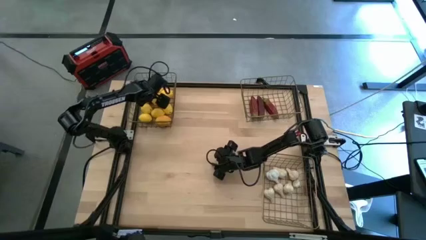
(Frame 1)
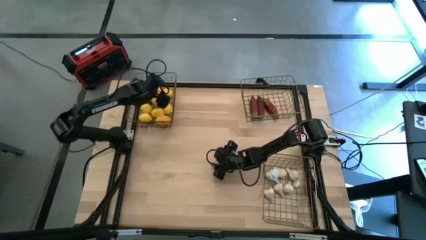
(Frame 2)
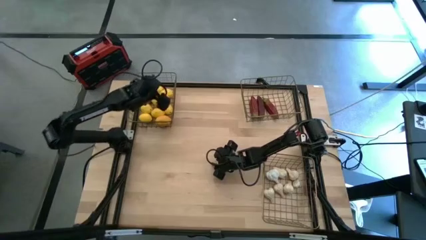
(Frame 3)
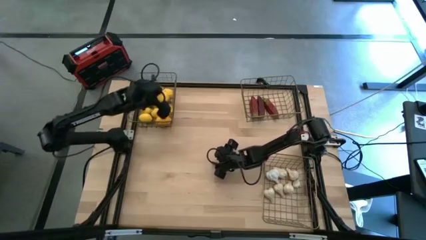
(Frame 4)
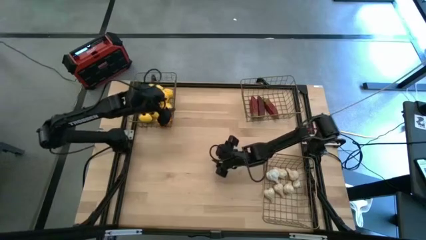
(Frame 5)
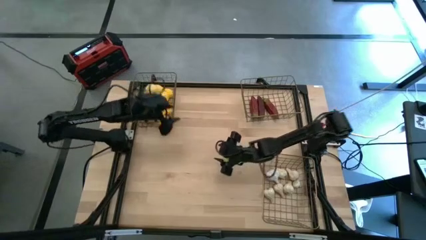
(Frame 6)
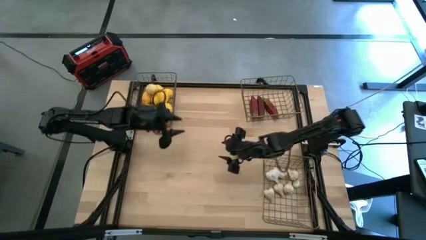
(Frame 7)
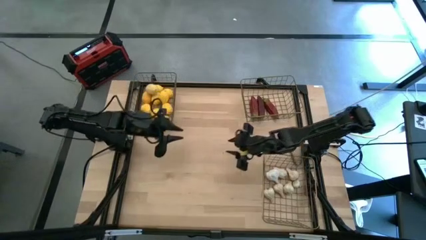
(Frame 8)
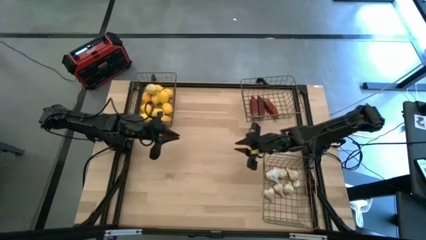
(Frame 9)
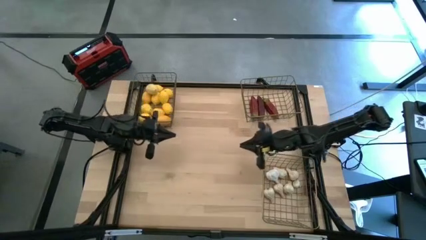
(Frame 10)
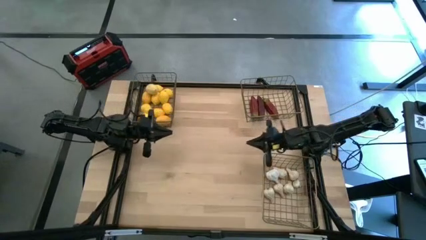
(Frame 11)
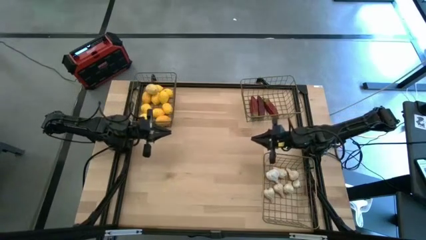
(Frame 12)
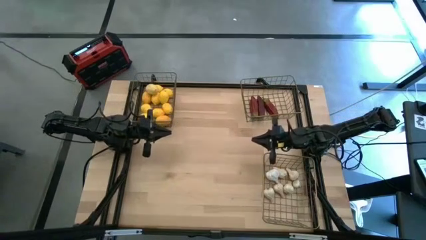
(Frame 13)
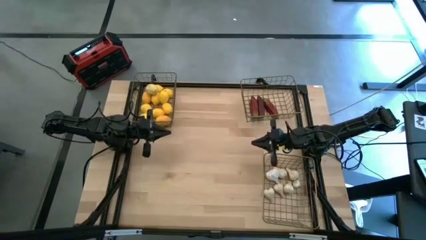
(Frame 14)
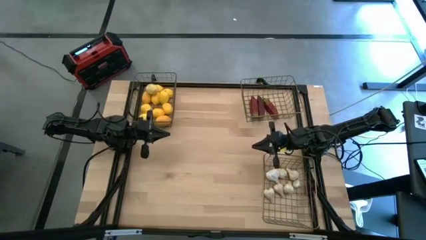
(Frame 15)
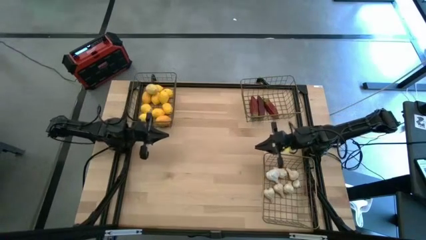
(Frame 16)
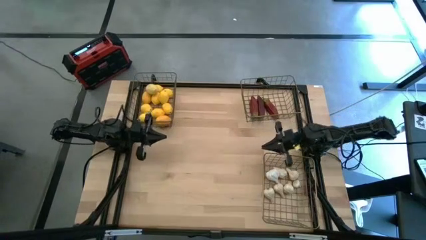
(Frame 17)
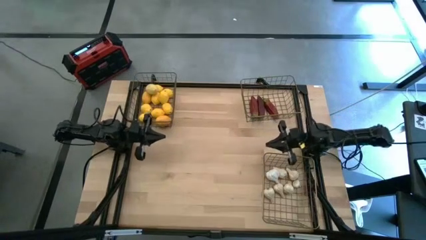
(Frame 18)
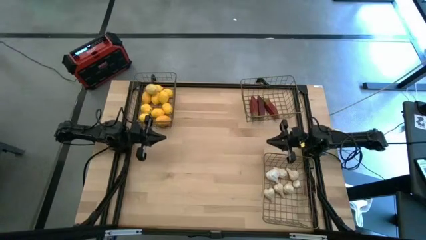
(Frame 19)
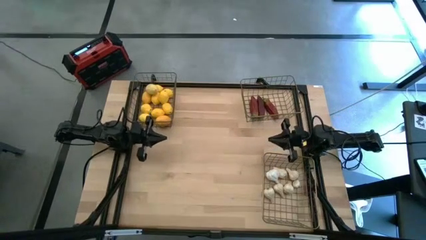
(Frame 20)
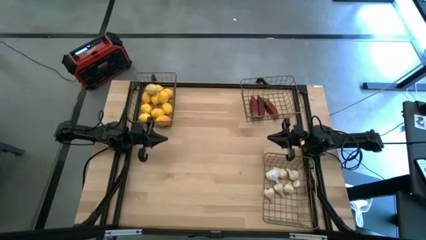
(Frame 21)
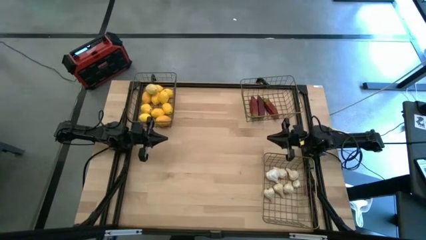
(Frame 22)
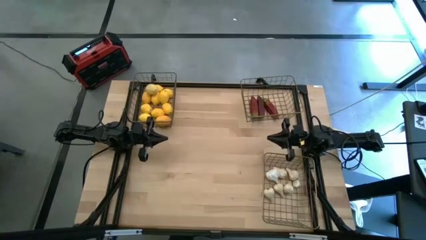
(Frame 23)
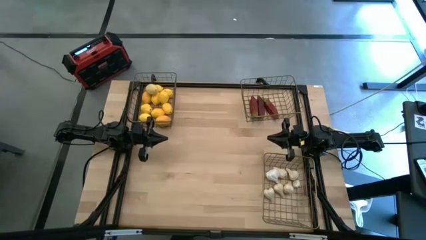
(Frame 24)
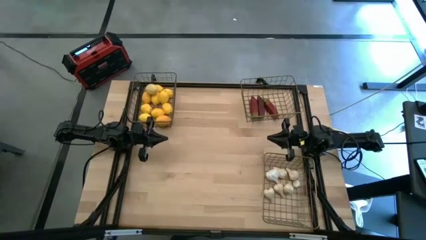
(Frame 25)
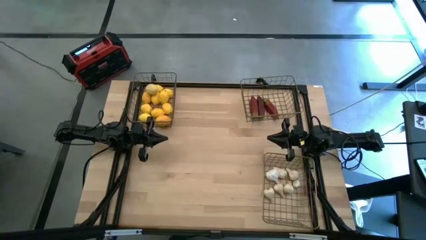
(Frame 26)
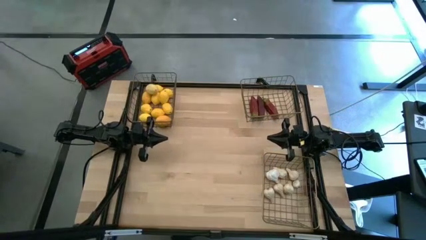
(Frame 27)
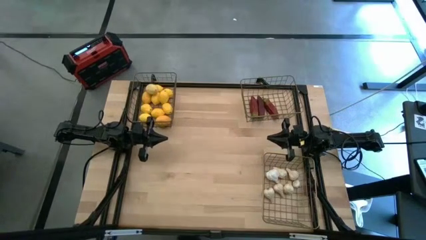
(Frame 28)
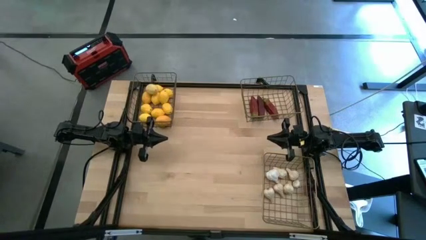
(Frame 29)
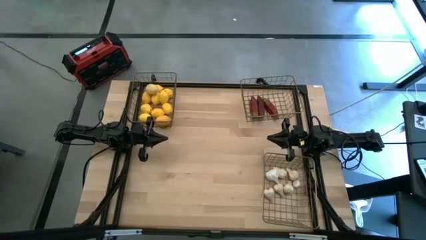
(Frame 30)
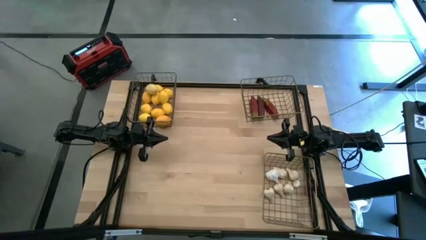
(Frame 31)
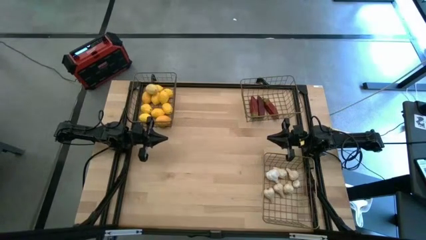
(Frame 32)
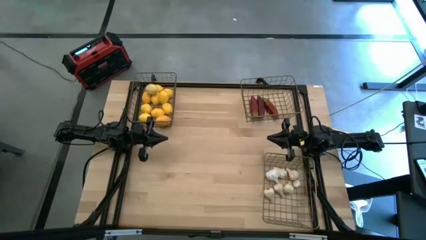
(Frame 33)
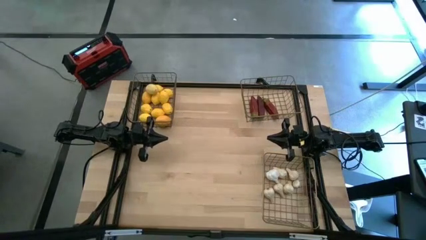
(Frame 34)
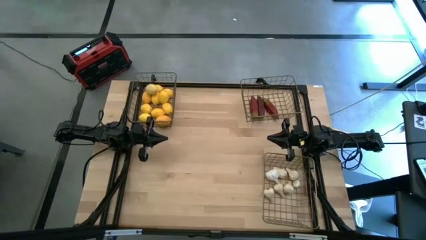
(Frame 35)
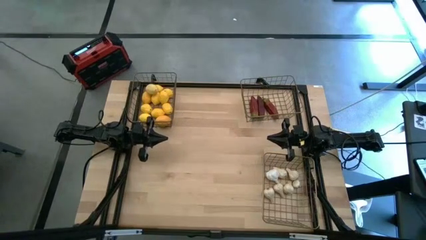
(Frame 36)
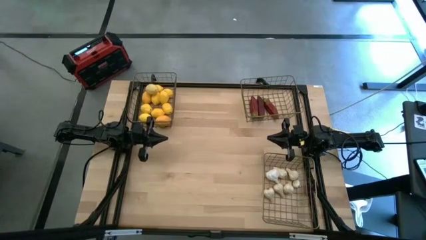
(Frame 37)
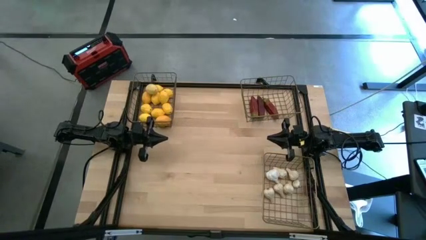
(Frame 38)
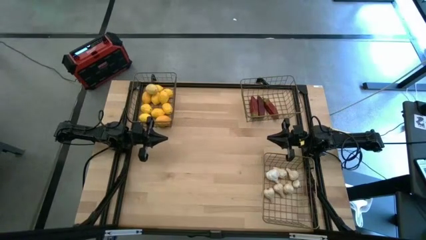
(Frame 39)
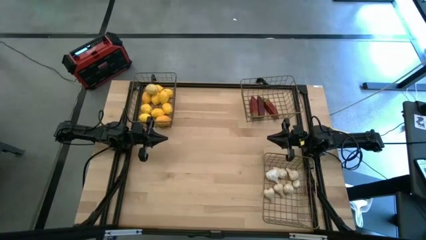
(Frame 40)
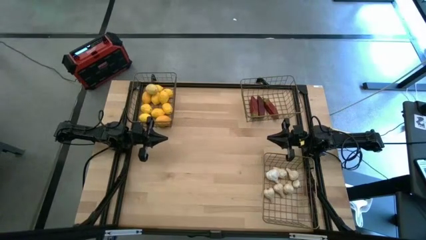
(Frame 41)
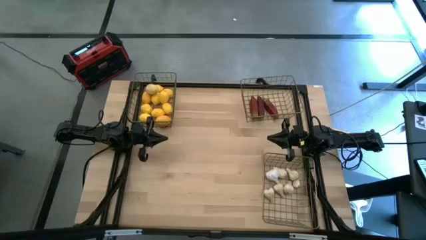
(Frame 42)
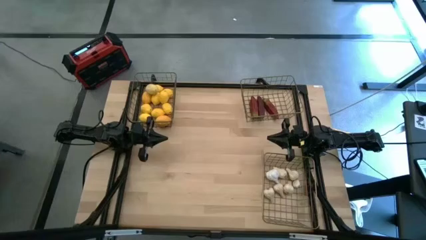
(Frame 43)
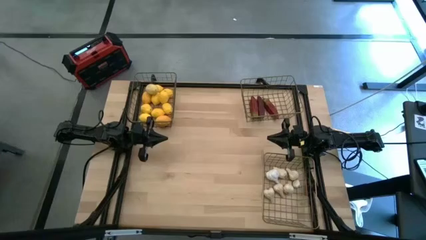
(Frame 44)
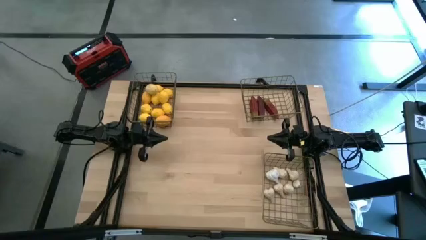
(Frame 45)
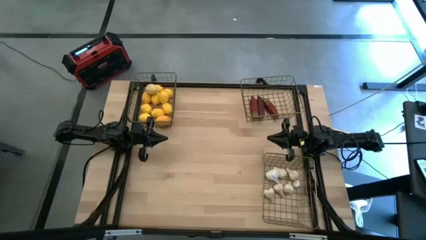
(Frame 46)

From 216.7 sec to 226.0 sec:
Task: Sort produce into baskets
Return to Home Position

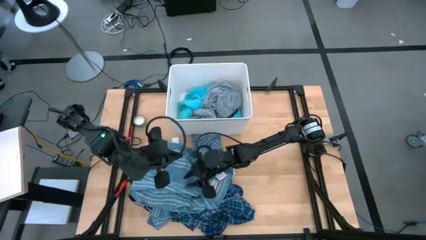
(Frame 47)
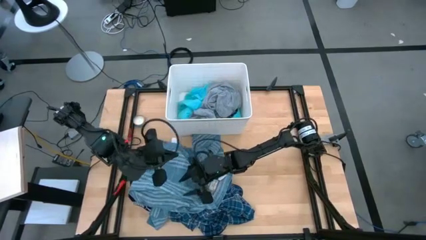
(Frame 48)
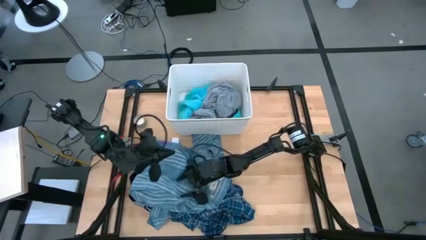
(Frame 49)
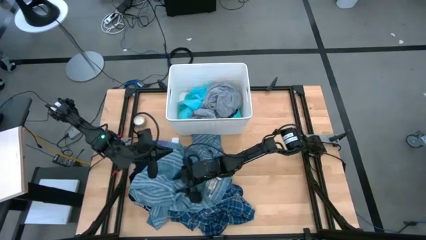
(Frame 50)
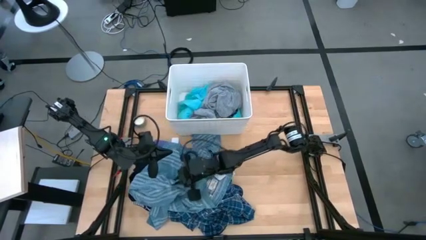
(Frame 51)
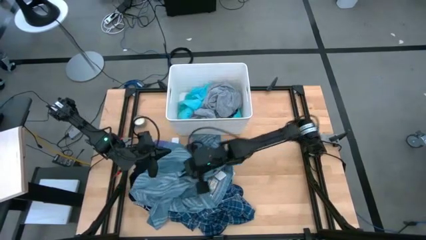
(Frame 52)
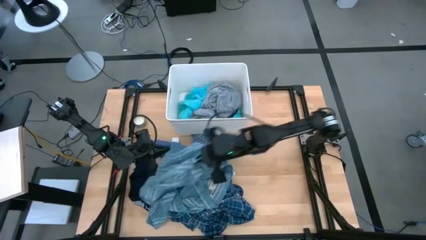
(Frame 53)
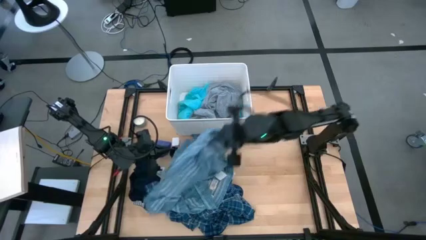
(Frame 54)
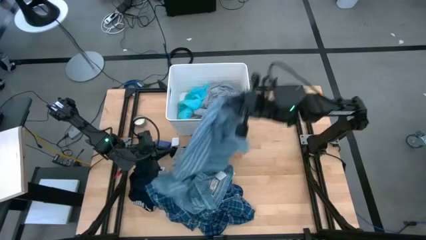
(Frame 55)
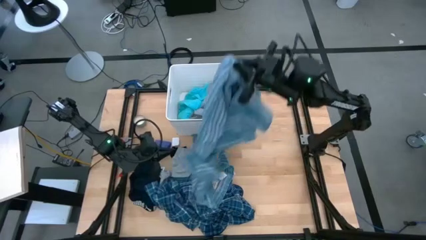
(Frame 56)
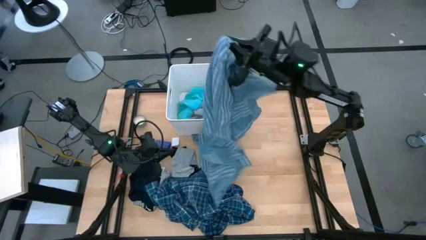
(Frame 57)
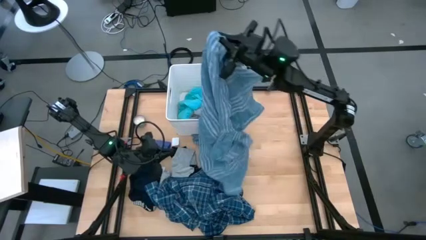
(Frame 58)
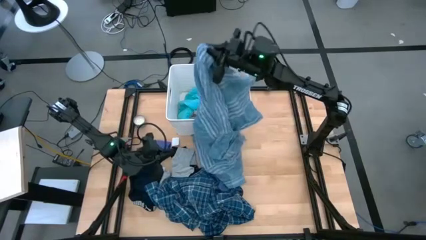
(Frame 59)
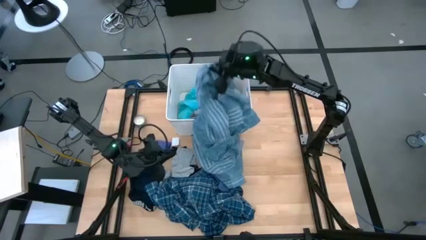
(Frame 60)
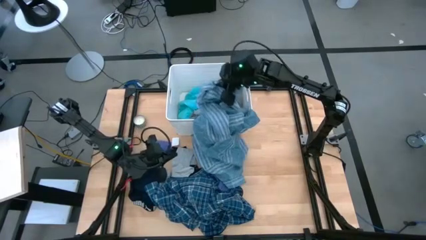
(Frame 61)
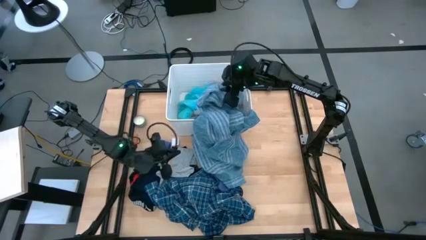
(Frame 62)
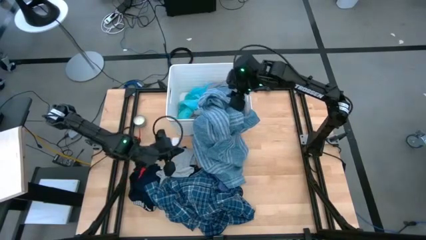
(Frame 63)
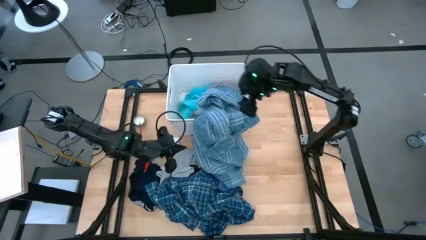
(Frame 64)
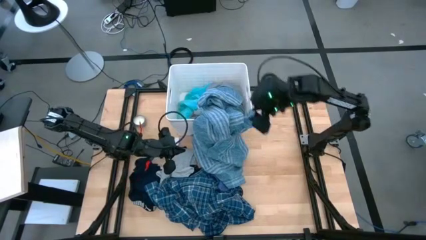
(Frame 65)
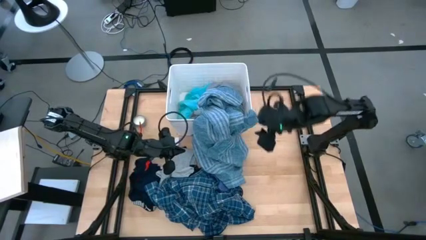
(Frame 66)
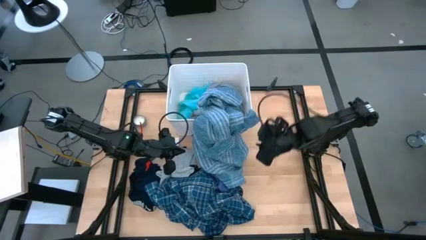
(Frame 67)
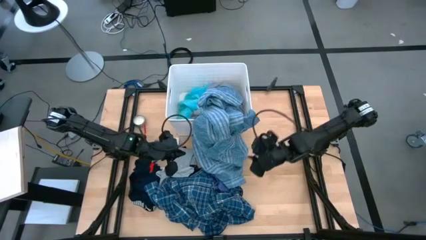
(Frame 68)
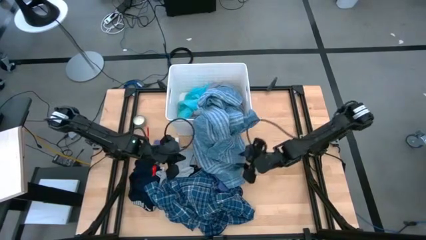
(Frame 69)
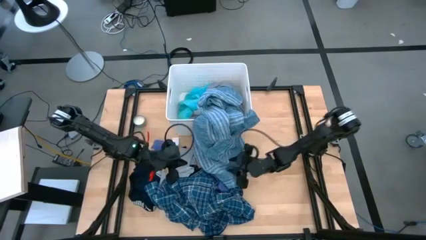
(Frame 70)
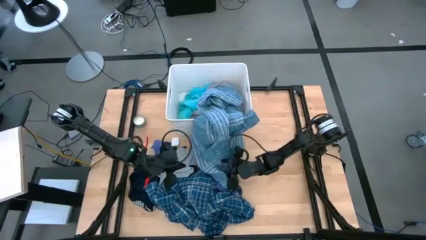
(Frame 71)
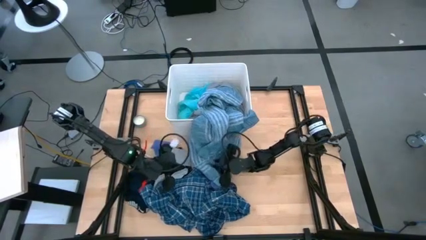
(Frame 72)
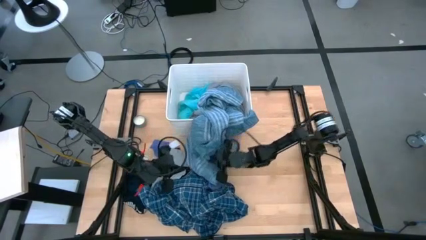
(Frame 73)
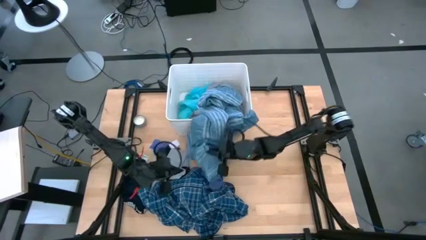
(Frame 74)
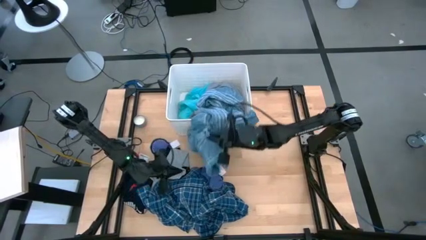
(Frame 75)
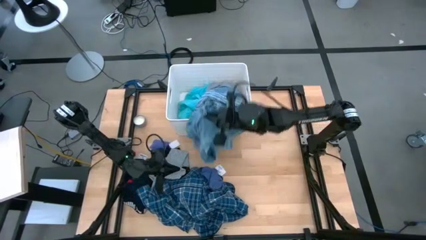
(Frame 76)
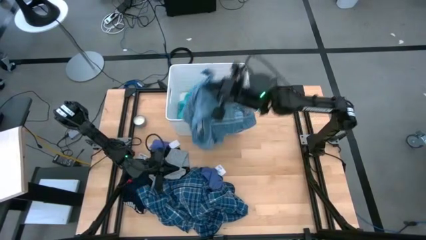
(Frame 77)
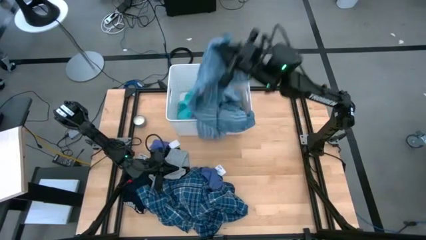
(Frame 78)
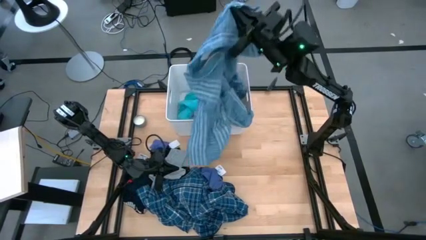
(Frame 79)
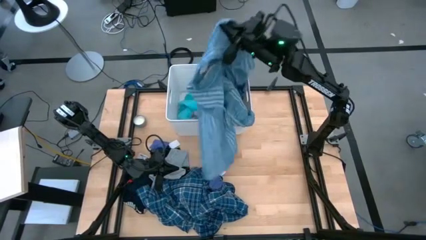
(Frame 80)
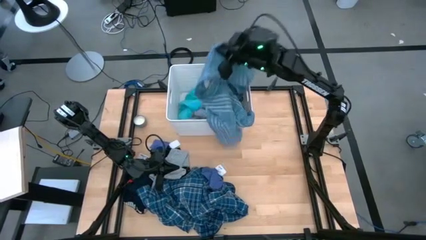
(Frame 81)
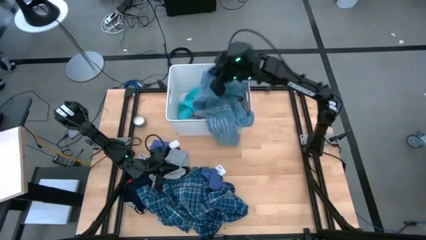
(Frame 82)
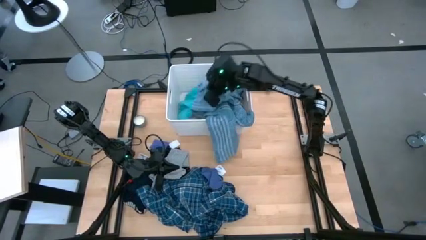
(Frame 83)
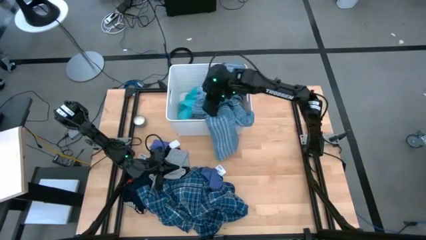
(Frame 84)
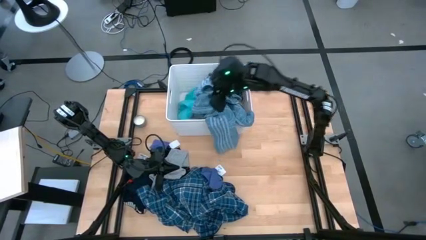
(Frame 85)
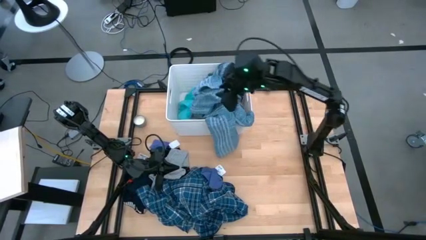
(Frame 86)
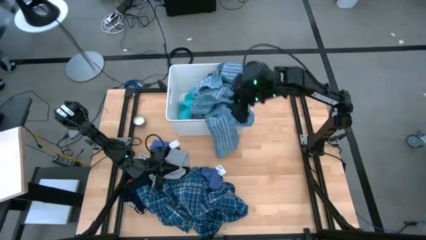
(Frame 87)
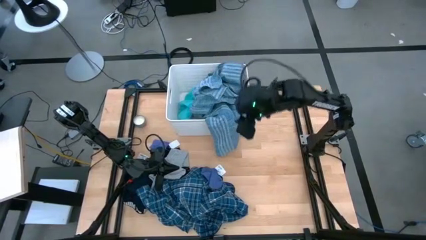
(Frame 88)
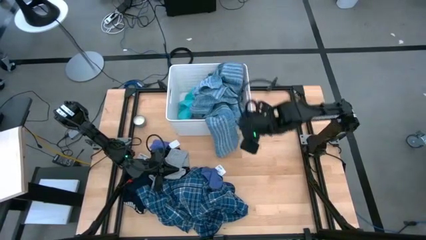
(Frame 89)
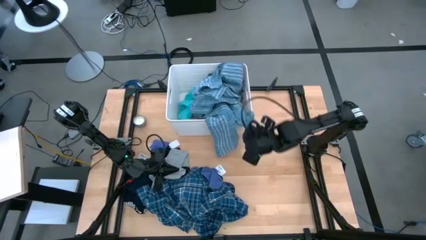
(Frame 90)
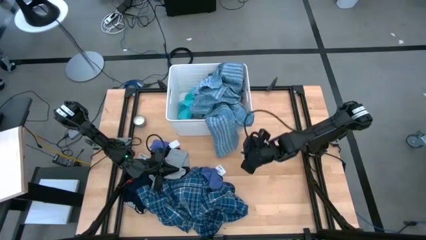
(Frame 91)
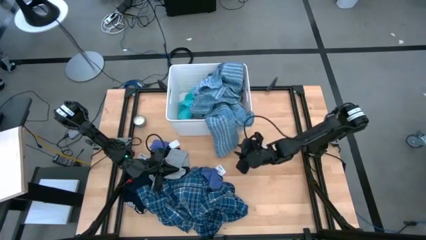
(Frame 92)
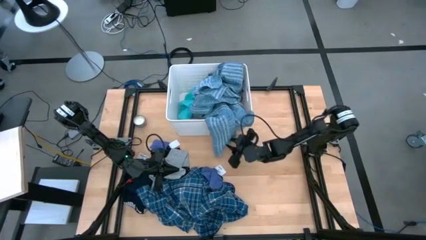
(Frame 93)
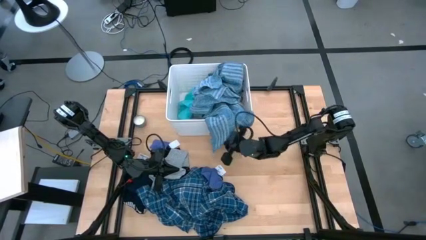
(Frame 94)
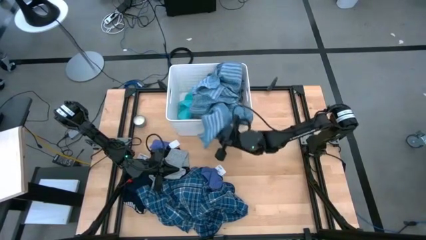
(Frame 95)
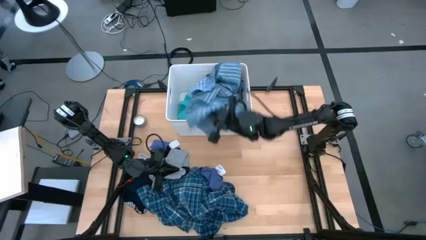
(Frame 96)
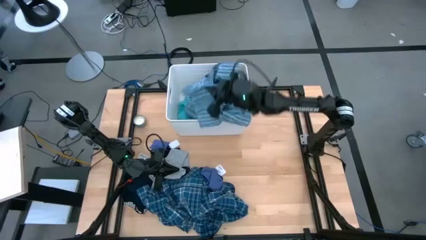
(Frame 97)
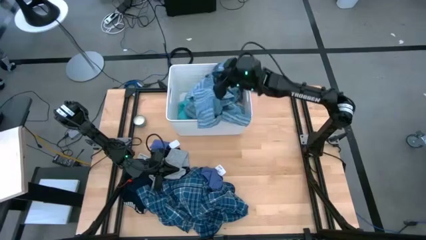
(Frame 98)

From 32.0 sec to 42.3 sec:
Task: Sort clothes
Put the light blue and white patterned shirt into the white laundry bin
